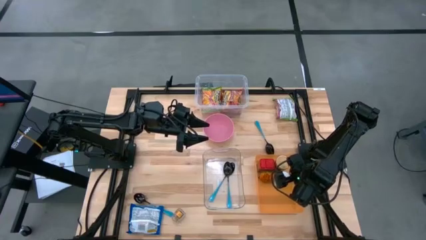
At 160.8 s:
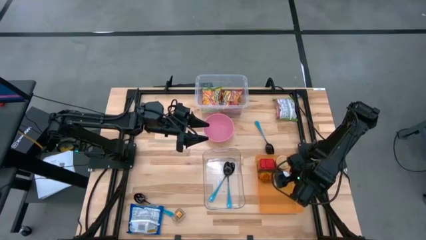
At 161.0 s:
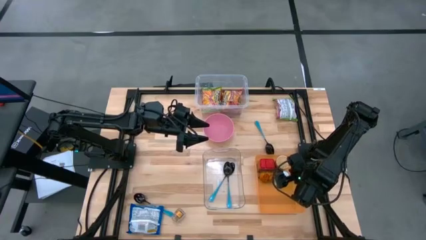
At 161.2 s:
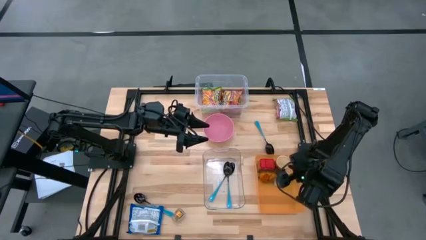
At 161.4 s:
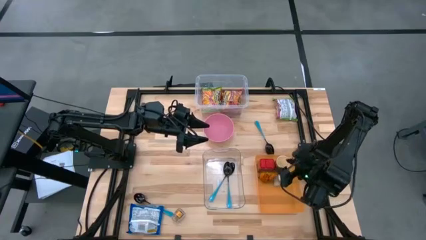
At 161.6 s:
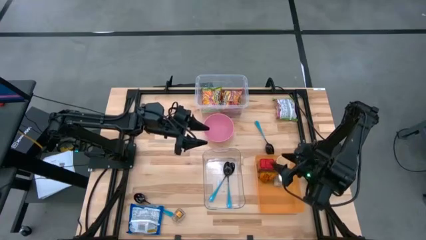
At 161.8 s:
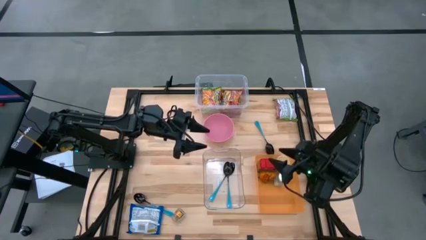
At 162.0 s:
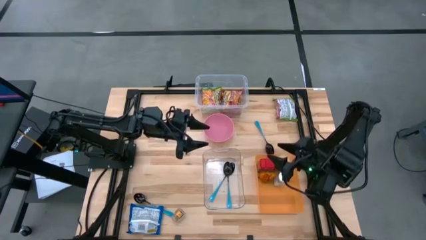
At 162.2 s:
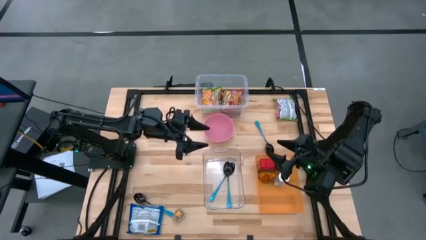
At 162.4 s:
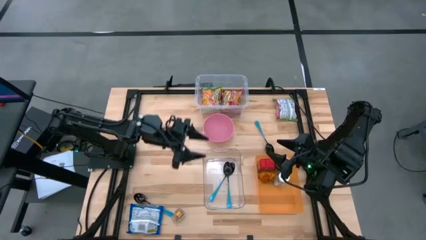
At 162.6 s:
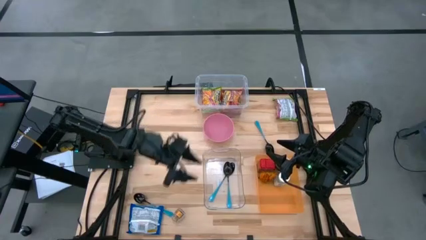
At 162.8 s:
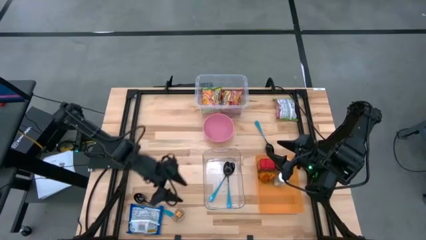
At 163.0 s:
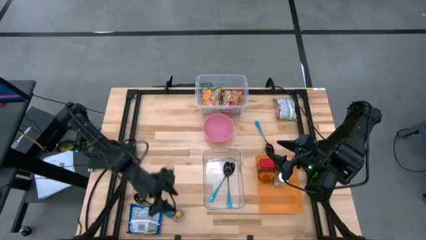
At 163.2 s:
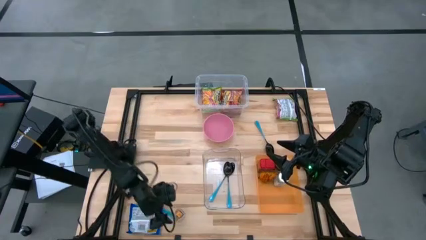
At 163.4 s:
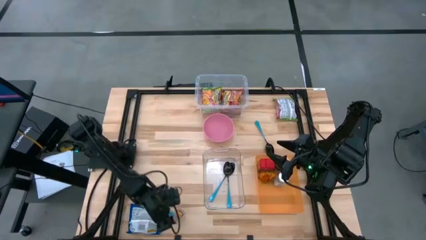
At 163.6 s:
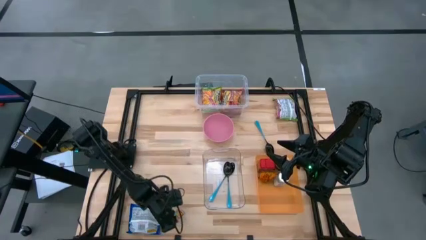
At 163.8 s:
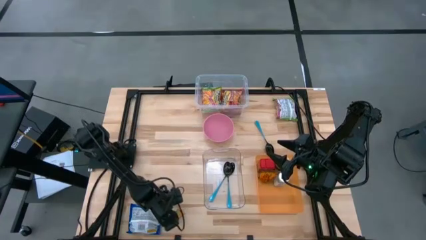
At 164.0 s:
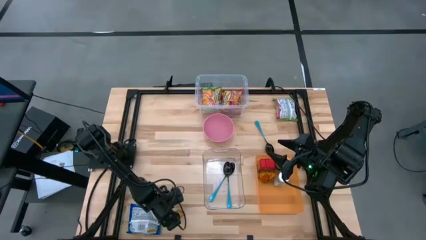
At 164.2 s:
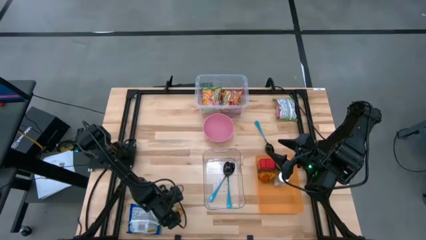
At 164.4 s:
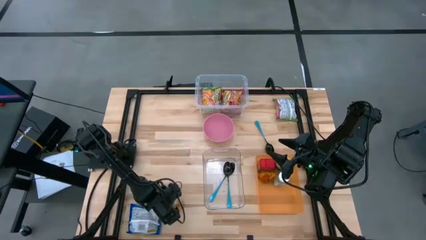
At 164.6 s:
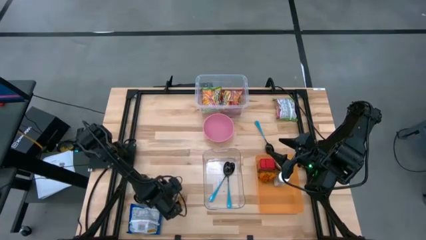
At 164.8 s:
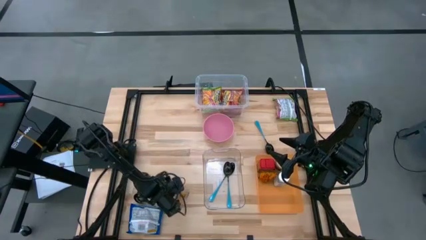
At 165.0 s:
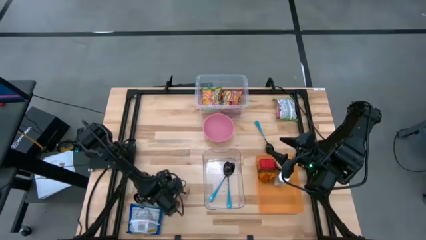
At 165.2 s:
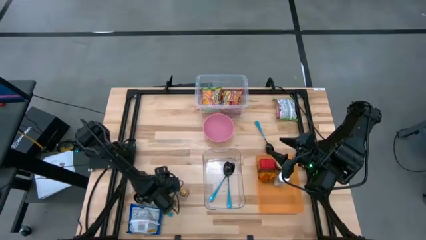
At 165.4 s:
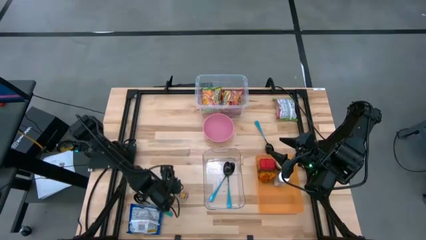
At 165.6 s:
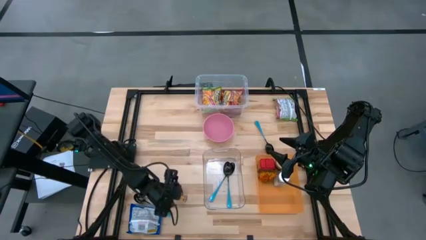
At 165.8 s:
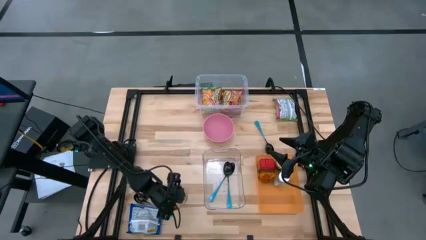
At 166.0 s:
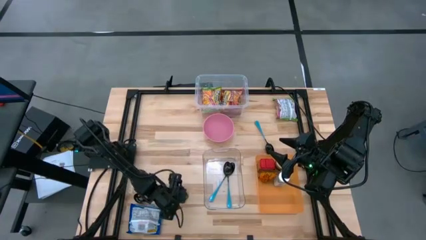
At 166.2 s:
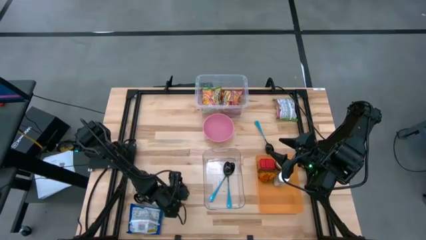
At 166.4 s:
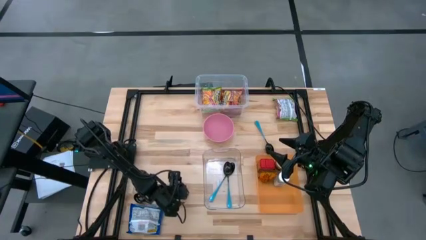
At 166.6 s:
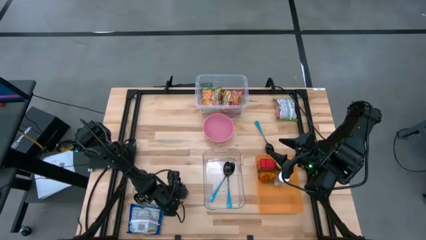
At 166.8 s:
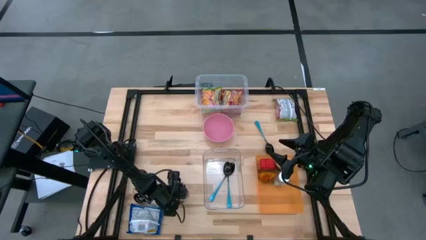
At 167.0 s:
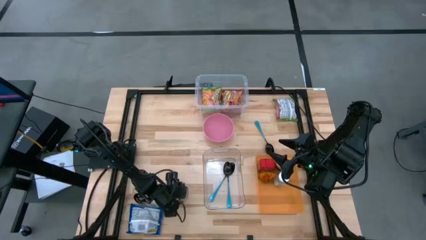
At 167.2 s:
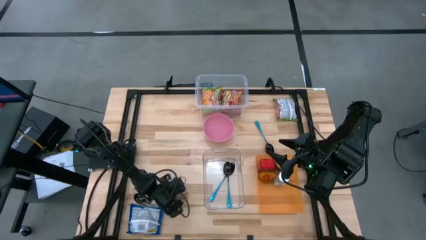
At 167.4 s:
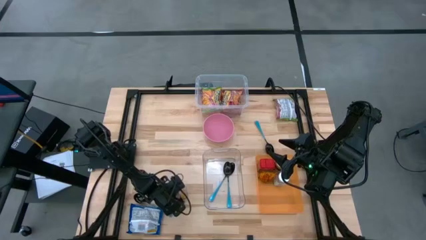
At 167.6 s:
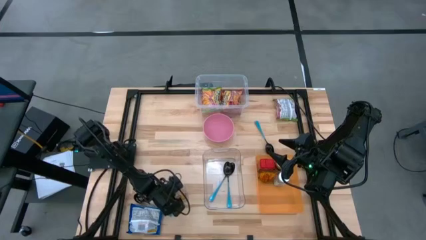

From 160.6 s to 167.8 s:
Task: Pick & Place Food Item
Put the brown seasoning bottle into the orange bin

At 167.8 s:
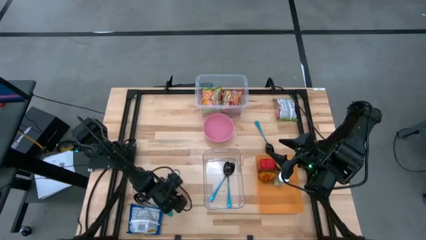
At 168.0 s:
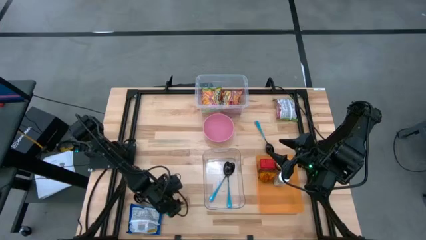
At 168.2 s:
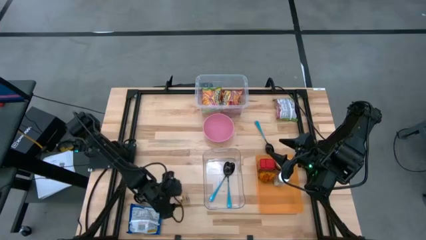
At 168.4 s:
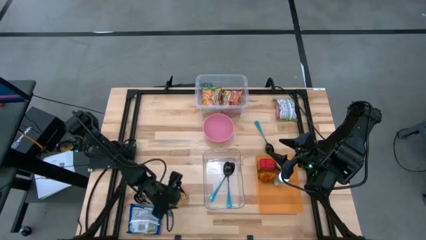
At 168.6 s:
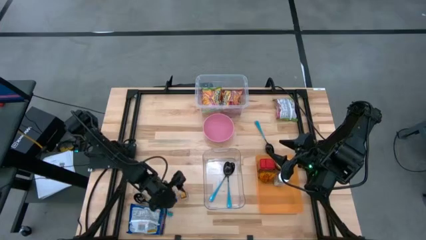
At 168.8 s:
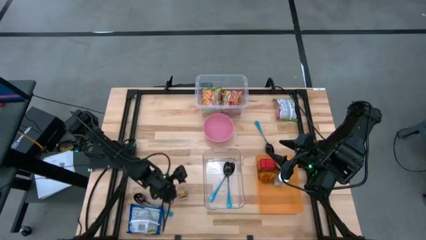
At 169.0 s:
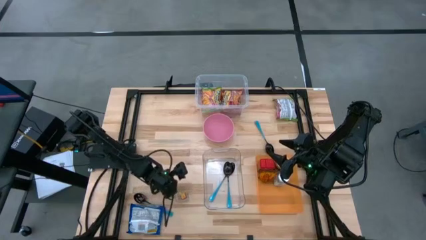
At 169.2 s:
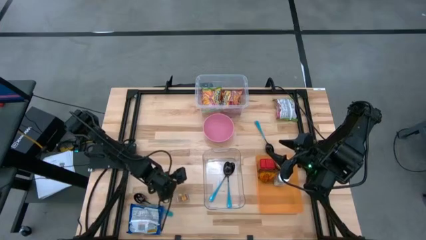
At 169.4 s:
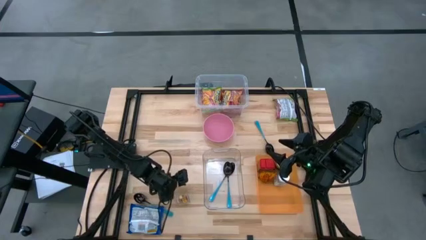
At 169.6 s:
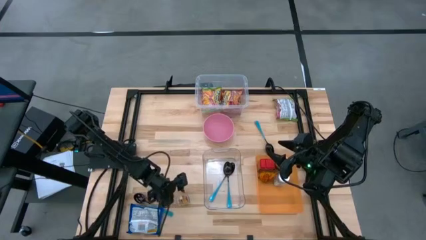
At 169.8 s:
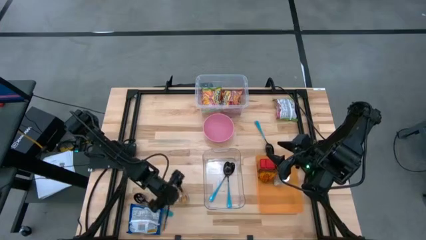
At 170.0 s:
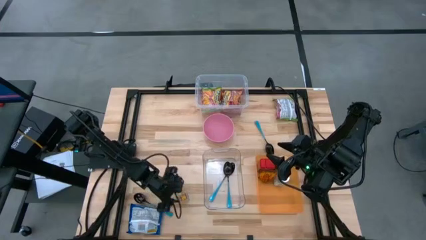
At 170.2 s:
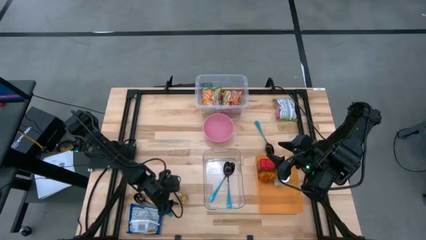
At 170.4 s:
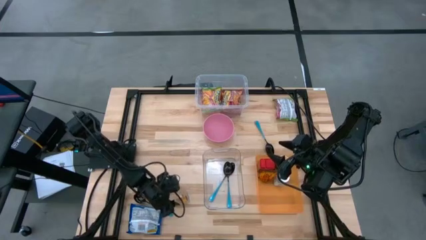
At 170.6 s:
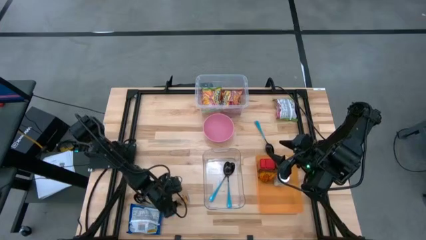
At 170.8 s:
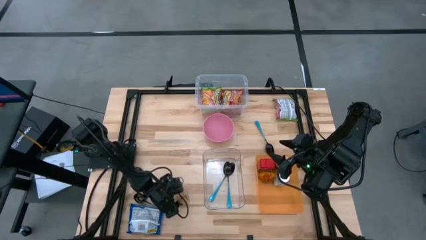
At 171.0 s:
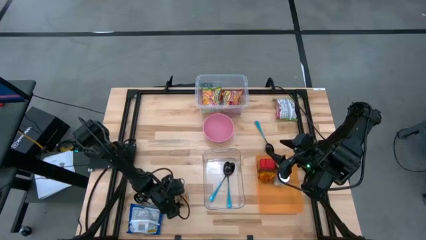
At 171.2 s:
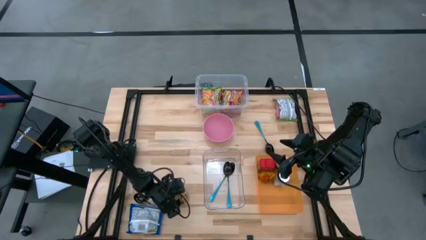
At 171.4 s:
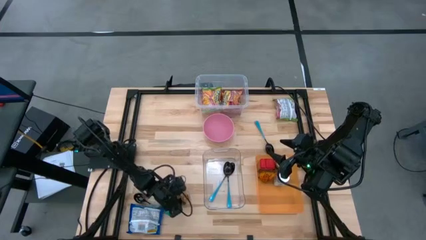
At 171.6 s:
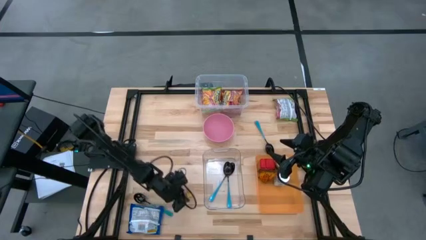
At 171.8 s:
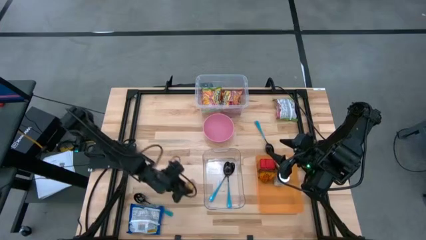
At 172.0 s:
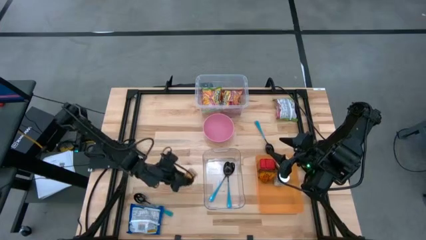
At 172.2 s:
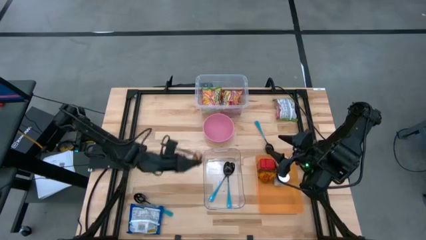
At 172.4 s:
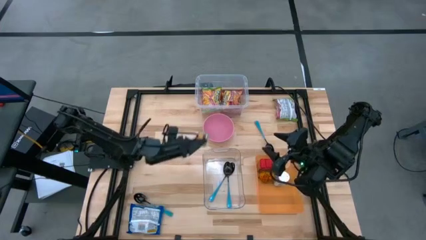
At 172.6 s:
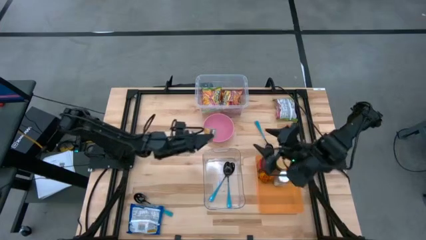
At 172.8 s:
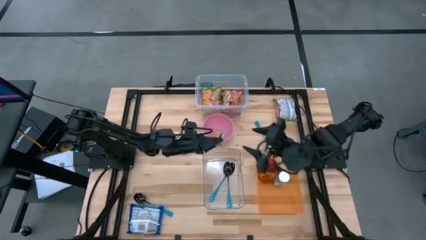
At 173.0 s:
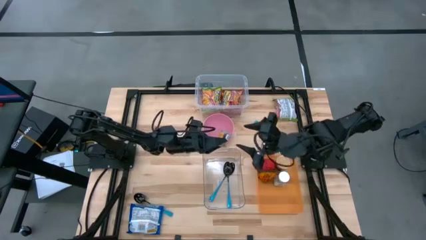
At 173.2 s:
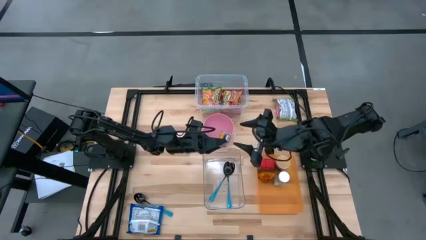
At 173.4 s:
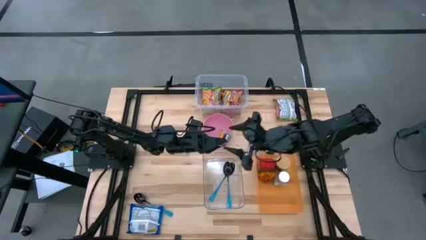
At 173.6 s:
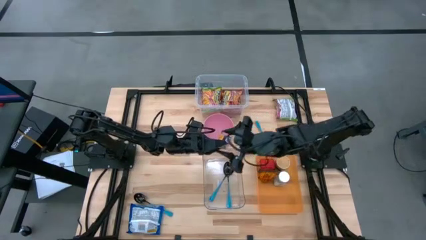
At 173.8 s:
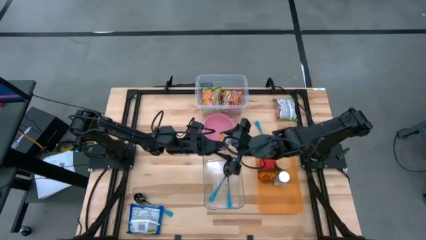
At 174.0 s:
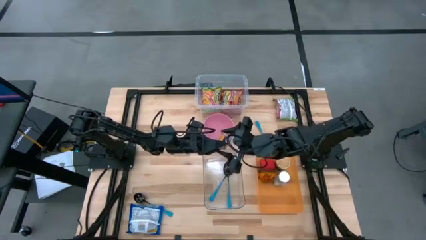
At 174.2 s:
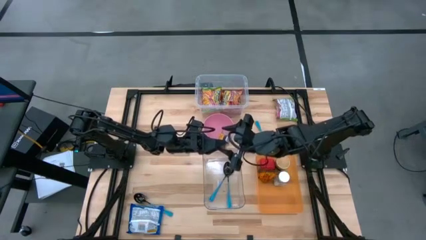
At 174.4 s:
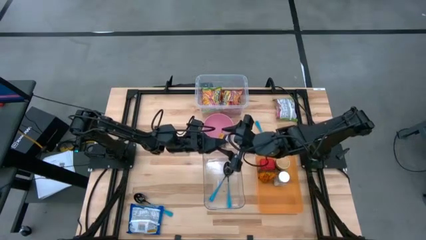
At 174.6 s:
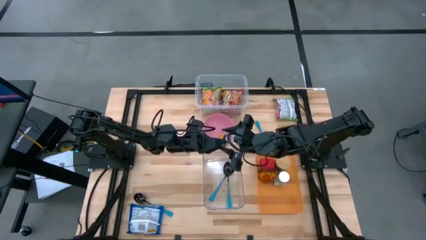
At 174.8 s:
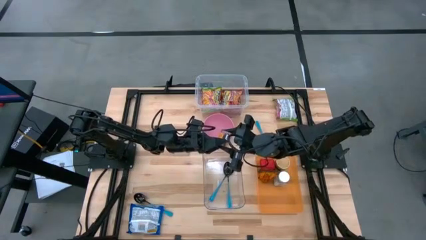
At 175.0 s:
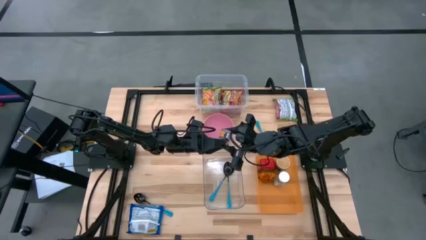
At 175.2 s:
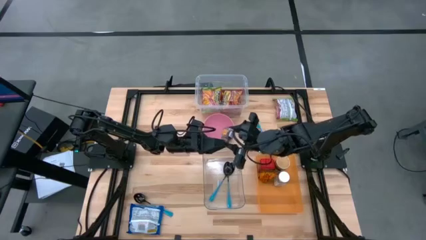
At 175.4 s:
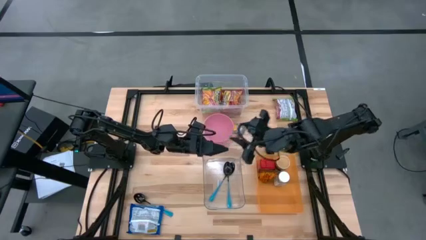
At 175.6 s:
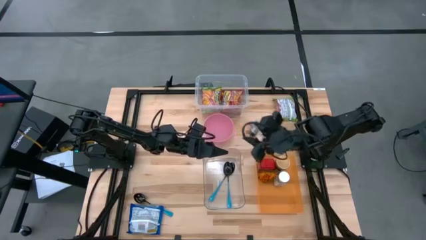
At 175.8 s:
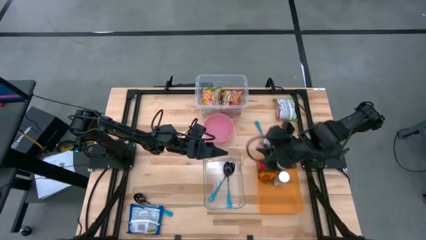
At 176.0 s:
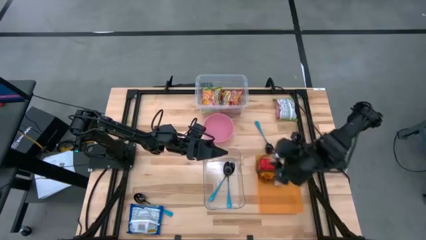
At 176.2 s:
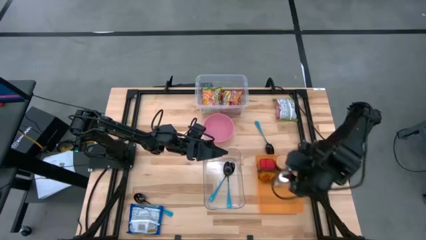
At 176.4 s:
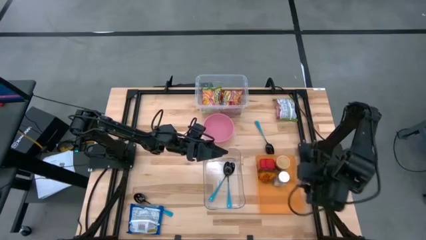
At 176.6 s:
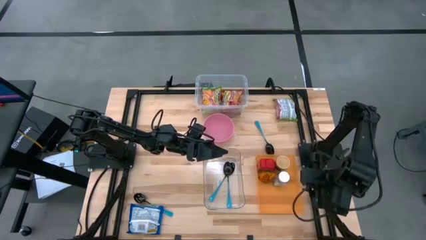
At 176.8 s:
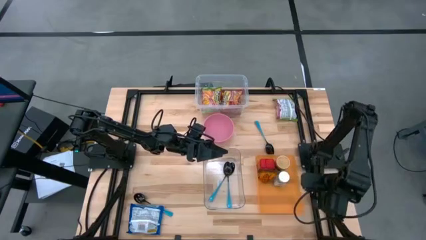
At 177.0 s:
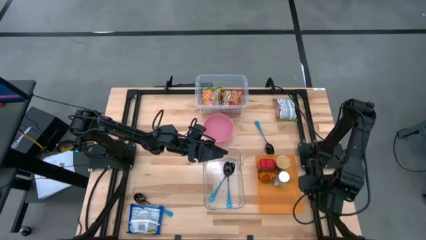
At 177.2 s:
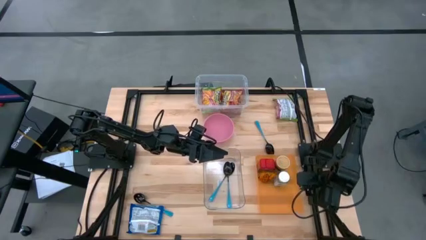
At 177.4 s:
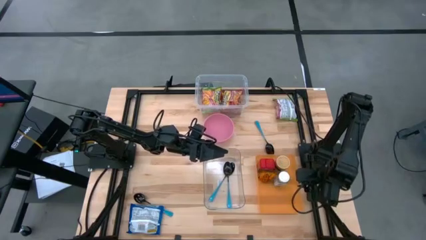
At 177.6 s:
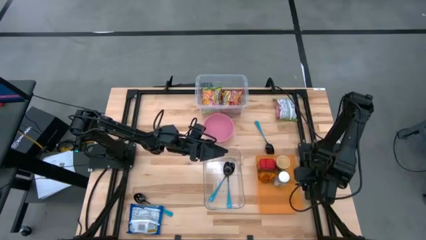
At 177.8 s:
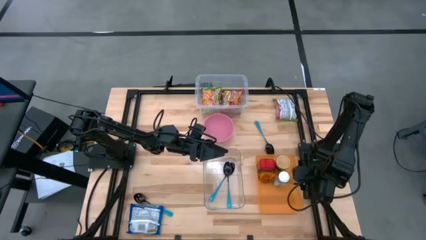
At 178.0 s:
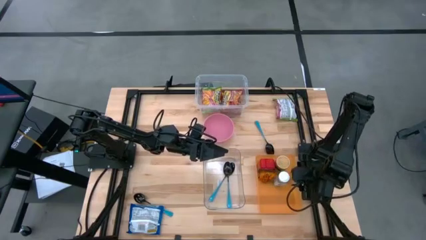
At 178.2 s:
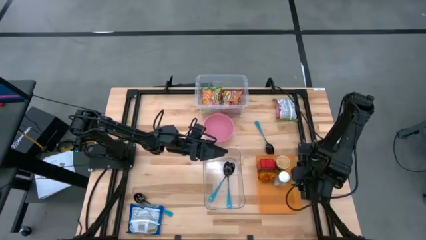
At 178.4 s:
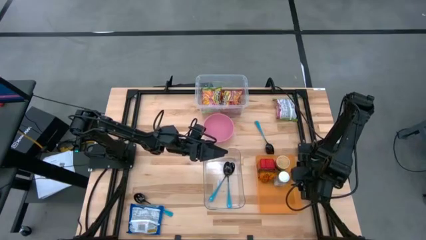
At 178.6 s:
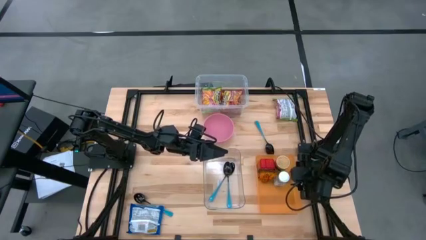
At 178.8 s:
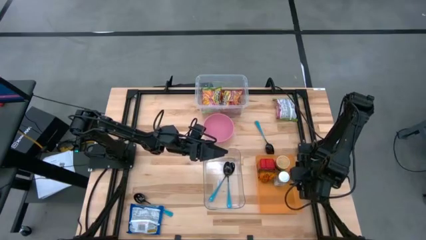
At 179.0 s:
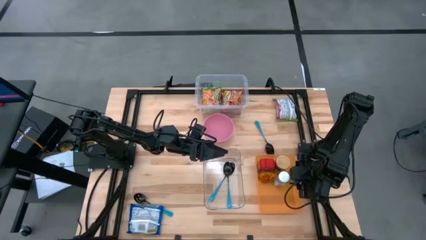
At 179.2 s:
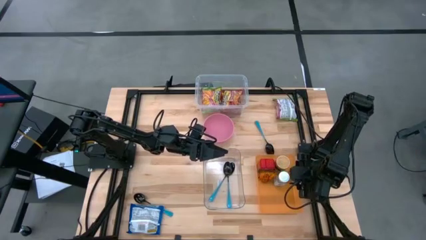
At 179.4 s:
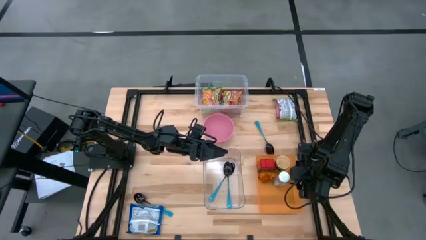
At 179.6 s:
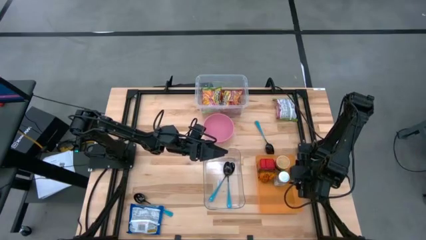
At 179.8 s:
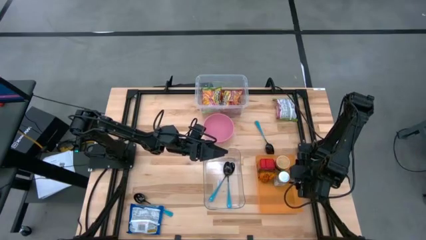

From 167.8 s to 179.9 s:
Put the brown seasoning bottle into the orange bin
